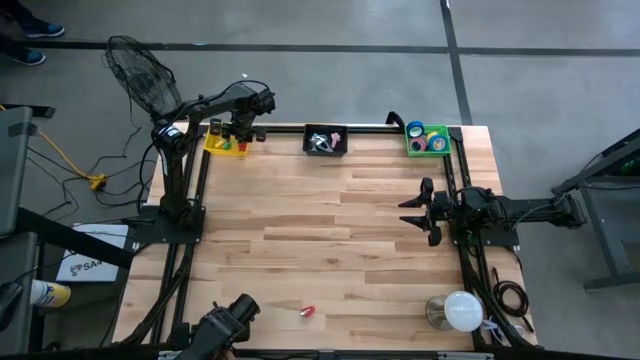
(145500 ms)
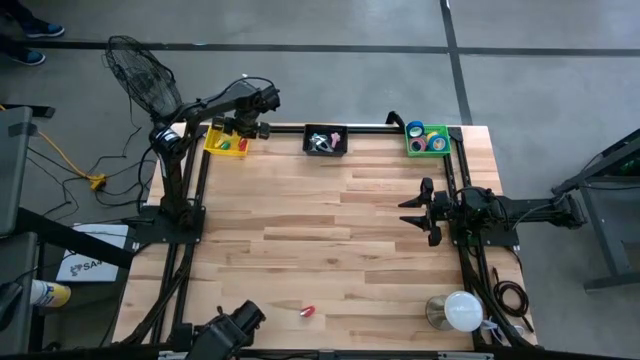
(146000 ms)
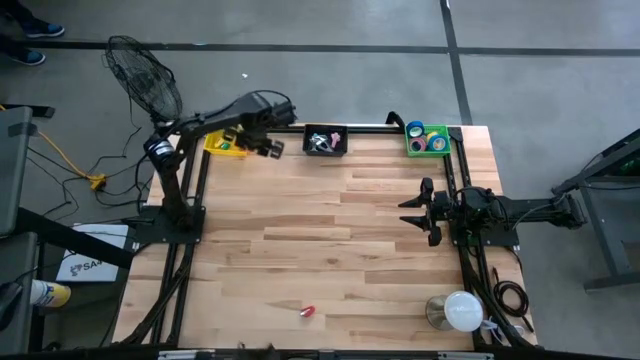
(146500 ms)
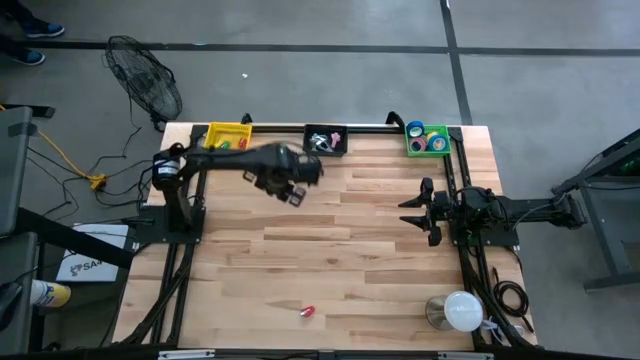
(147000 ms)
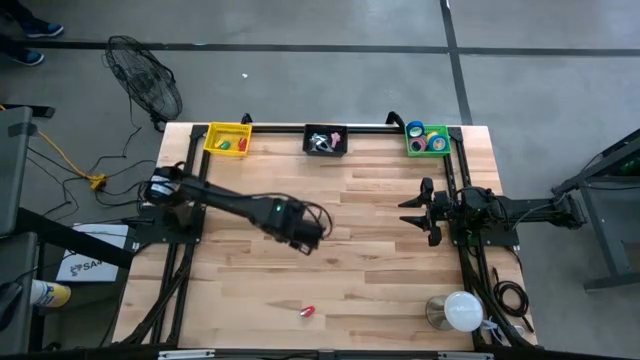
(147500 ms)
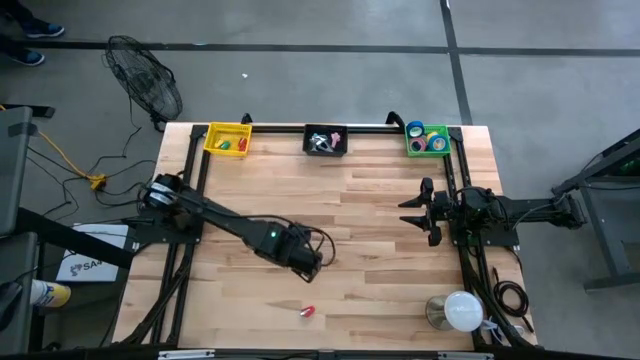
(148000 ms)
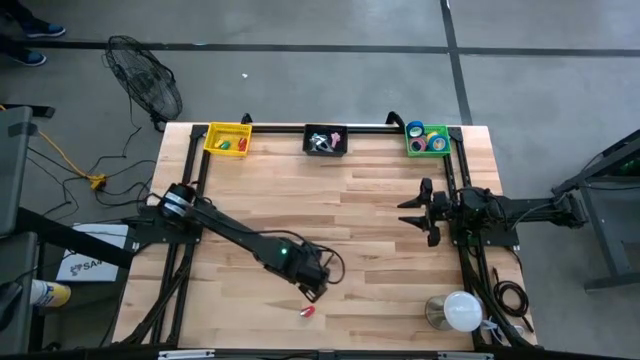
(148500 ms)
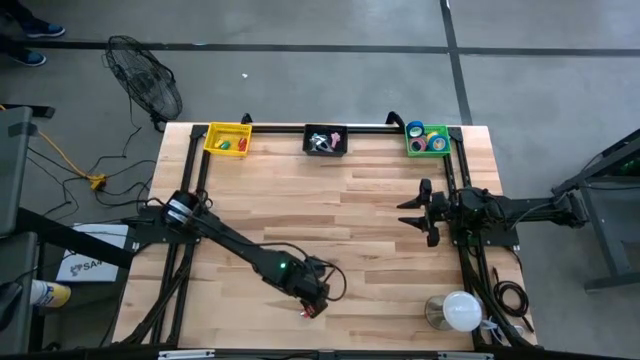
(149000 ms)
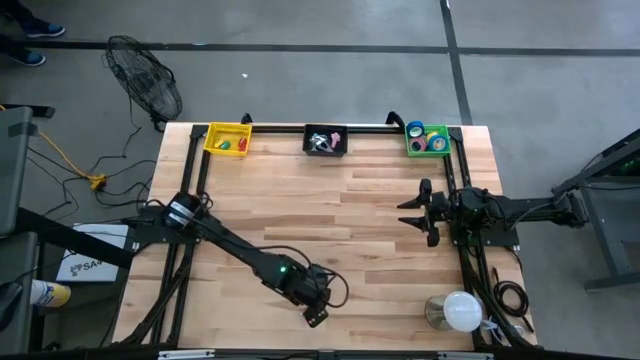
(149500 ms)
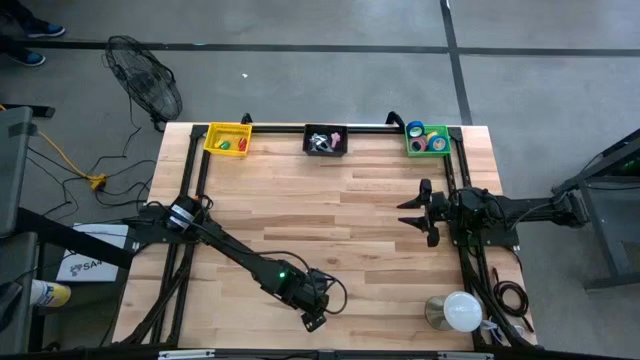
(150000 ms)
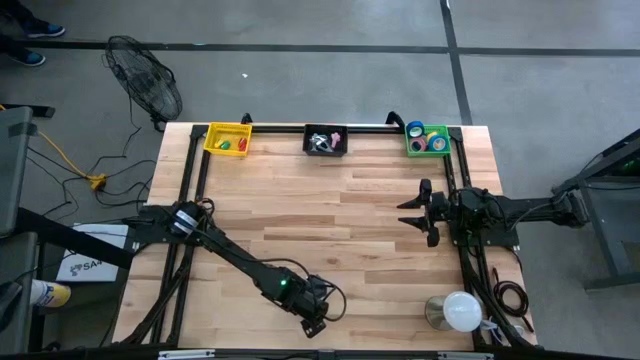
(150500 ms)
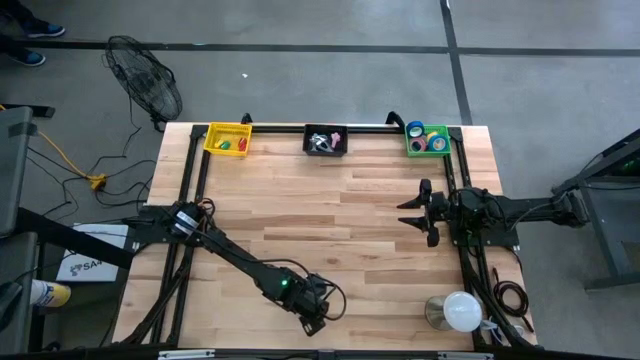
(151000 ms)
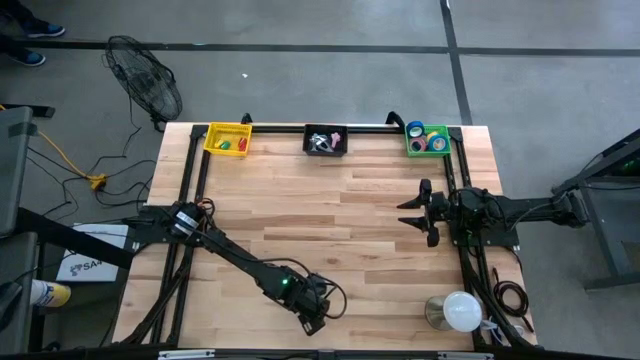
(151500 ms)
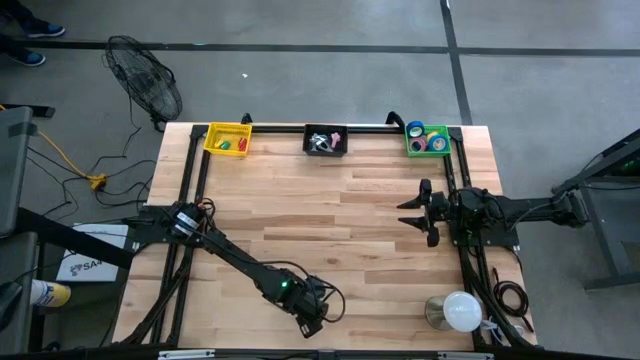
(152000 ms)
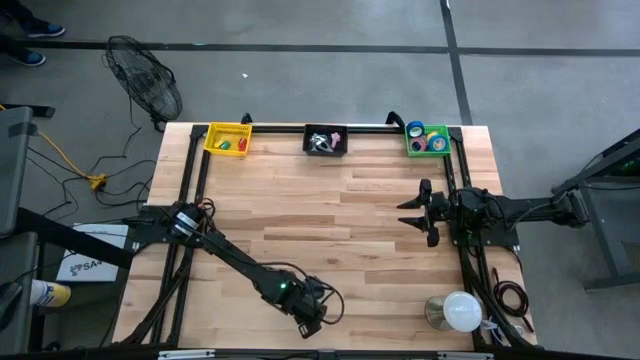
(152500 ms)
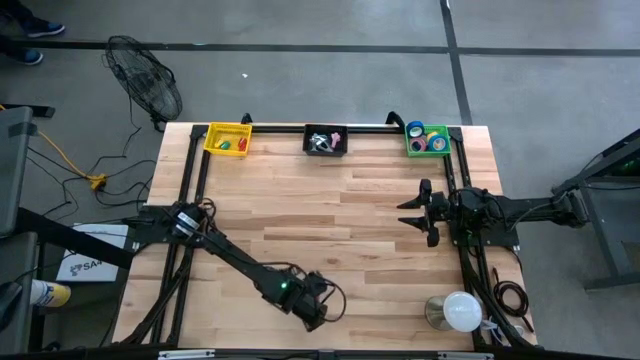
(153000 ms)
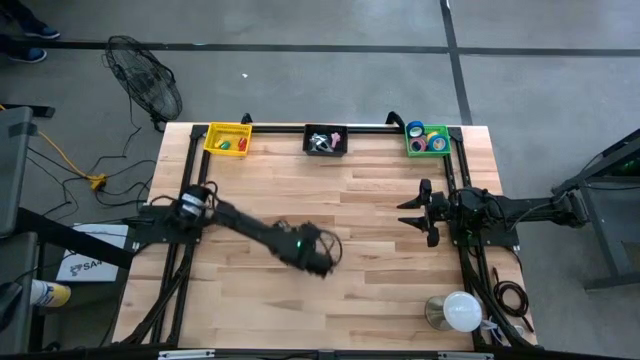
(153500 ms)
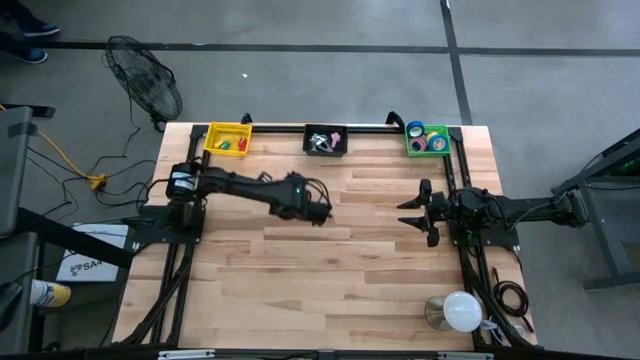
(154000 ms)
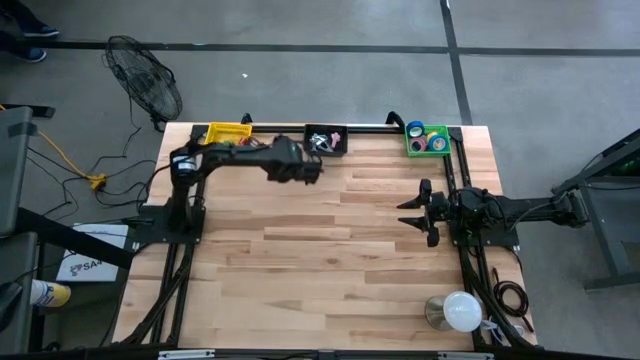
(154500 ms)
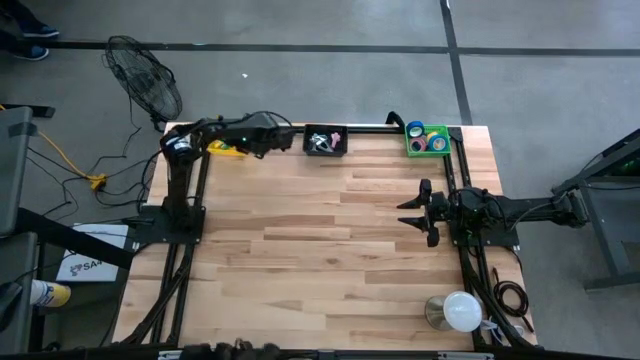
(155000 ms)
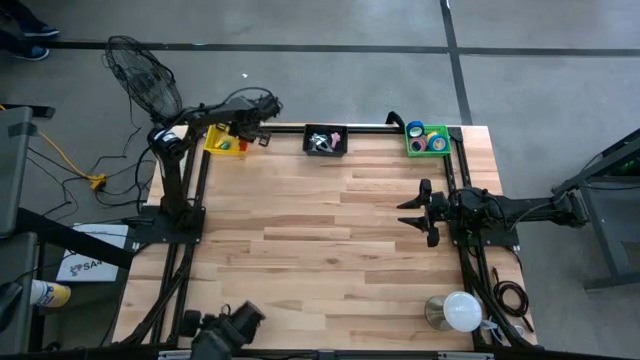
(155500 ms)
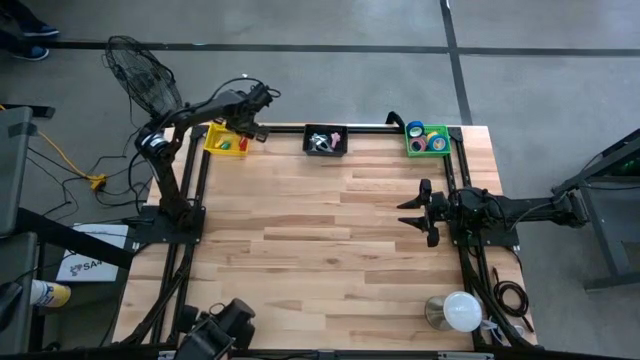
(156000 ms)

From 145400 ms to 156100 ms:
Task: Pick and place Stapler, Stapler remover, tape
Put the red stapler into the yellow bin

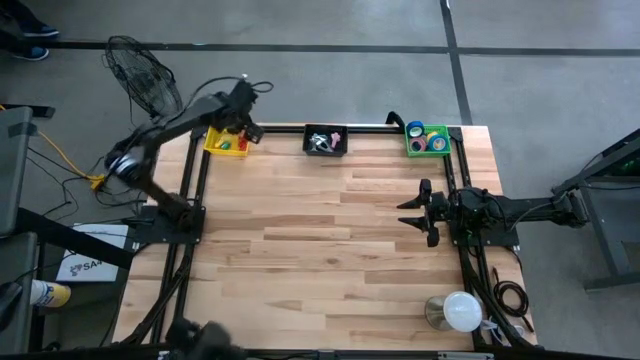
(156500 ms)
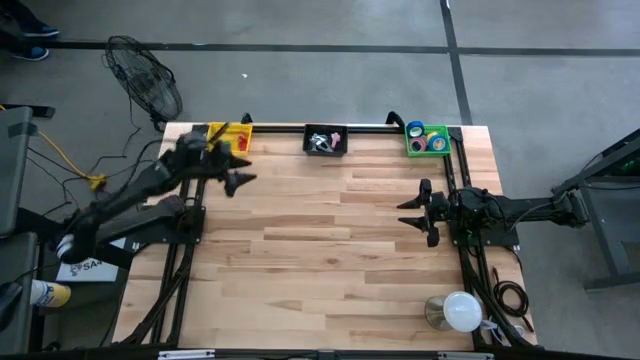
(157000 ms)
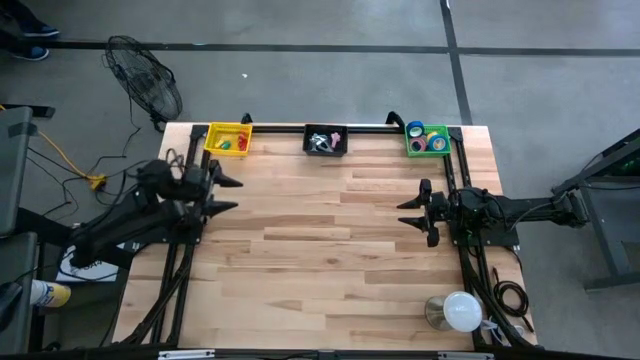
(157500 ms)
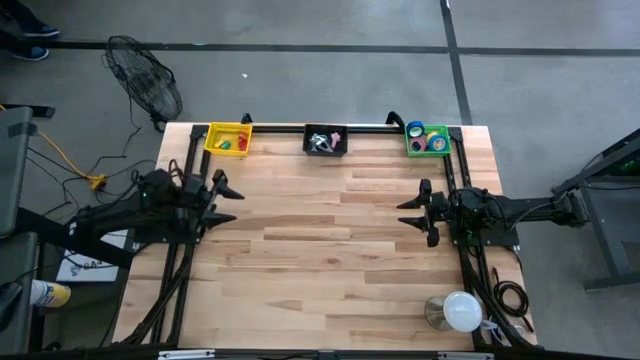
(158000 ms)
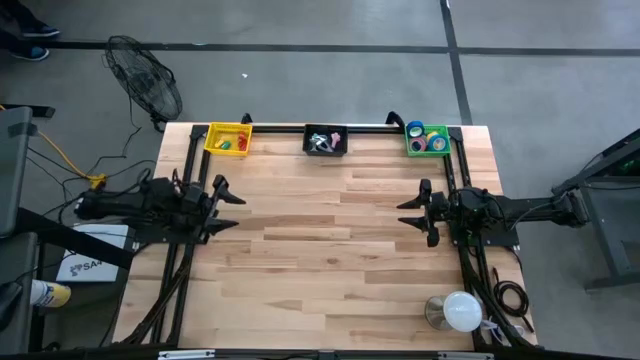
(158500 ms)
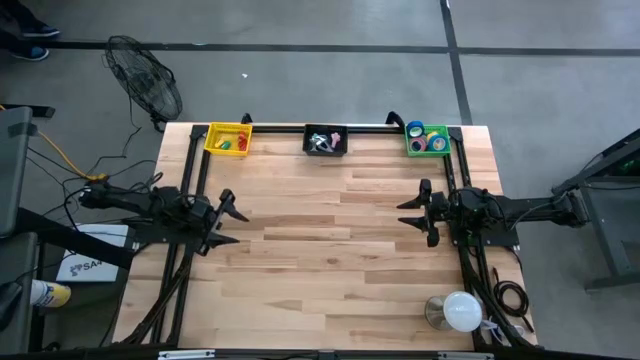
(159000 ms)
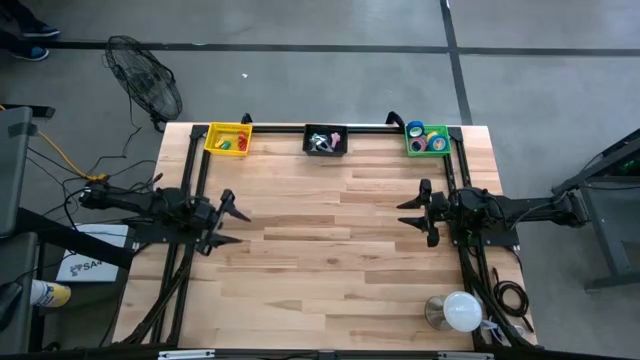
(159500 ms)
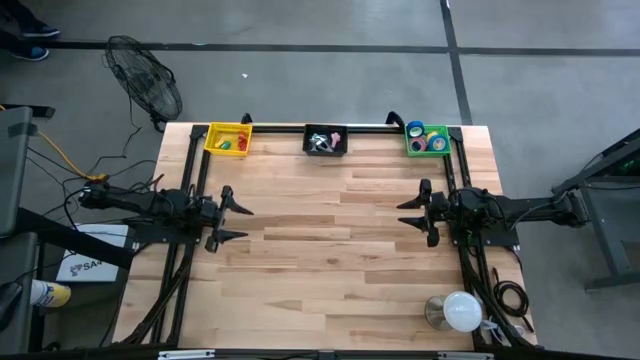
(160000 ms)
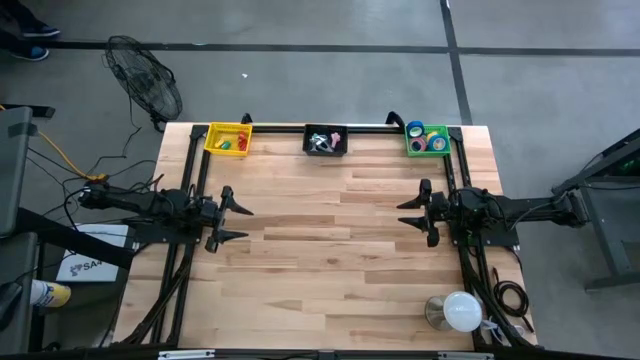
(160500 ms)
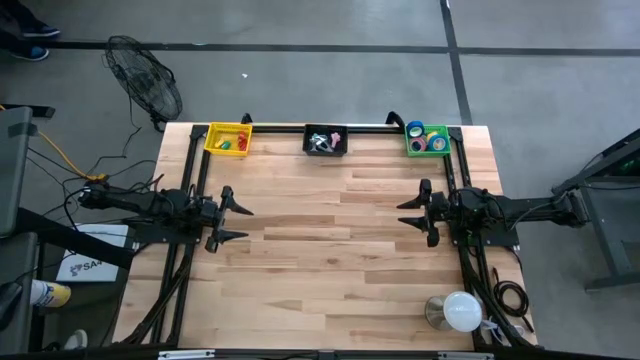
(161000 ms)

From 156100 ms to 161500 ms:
Return to Home Position

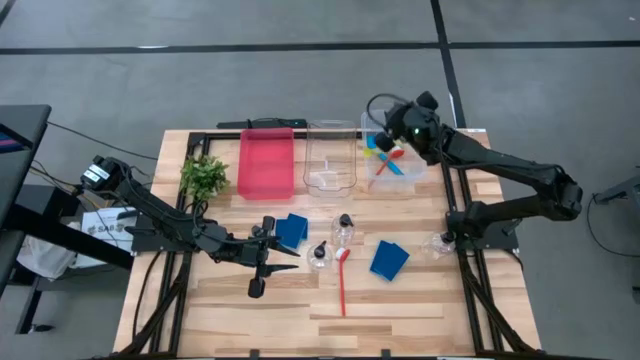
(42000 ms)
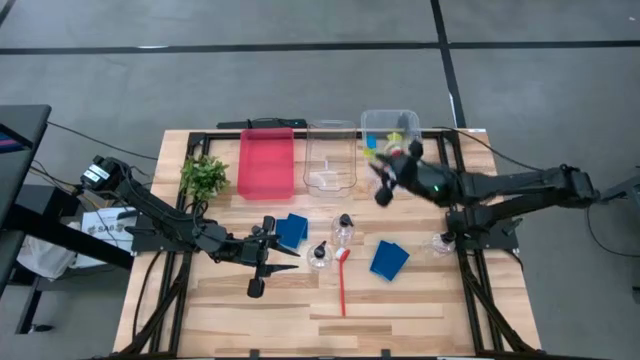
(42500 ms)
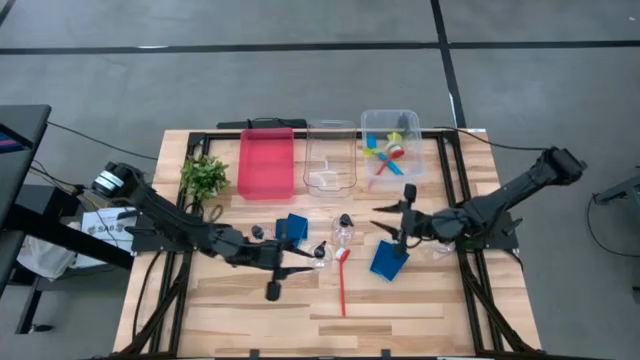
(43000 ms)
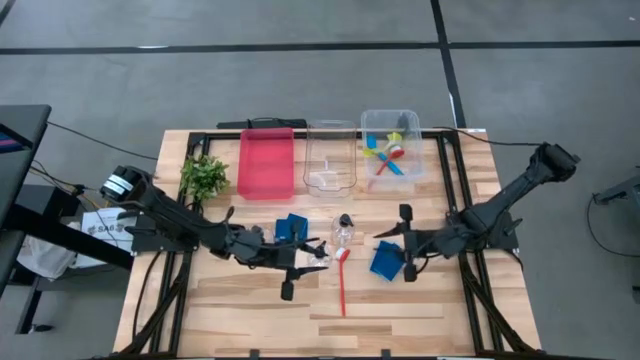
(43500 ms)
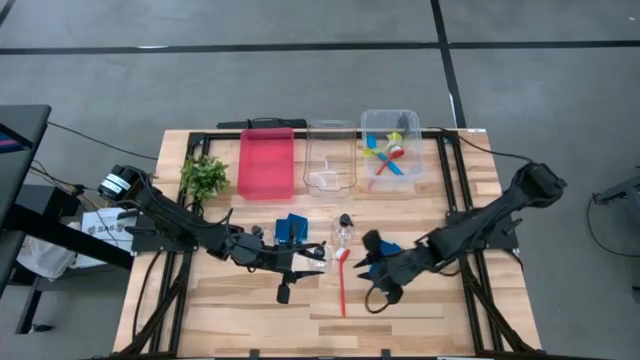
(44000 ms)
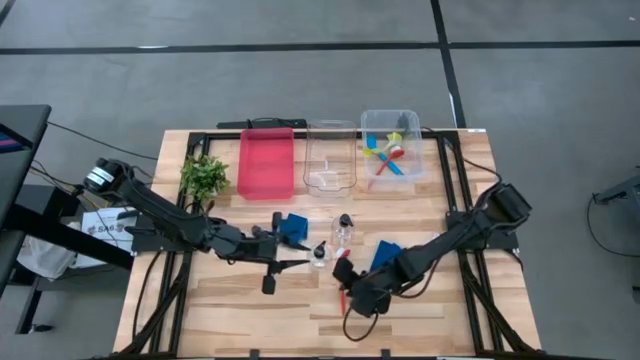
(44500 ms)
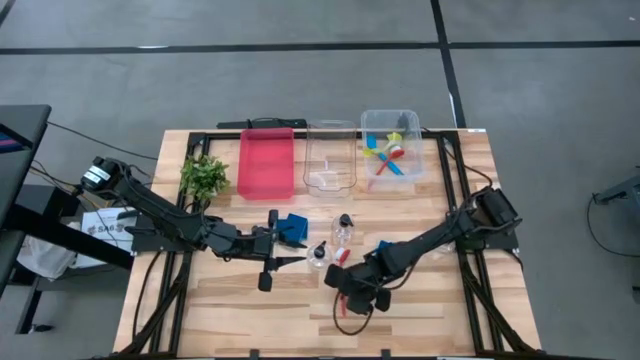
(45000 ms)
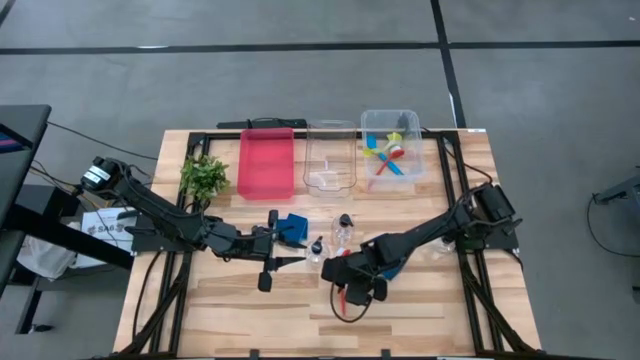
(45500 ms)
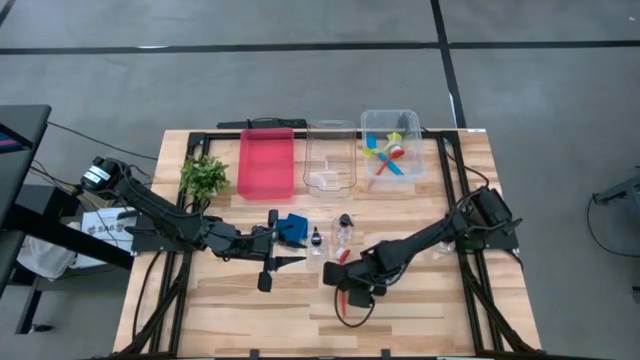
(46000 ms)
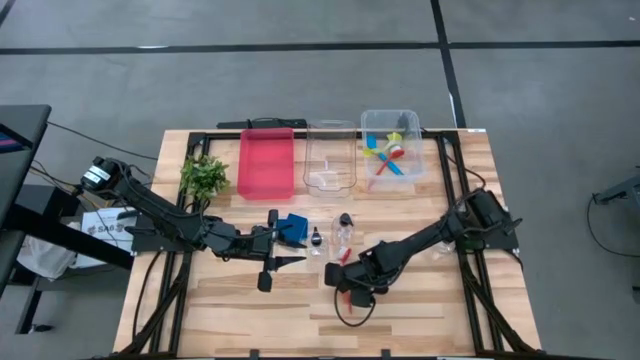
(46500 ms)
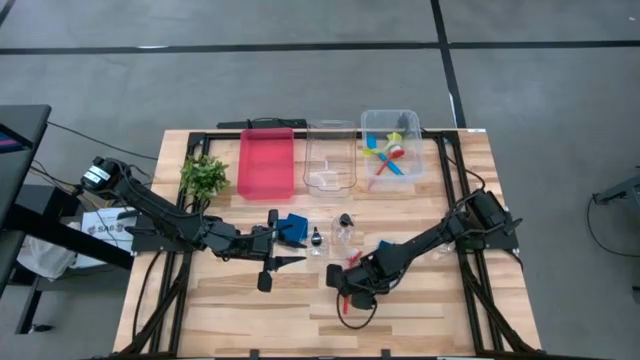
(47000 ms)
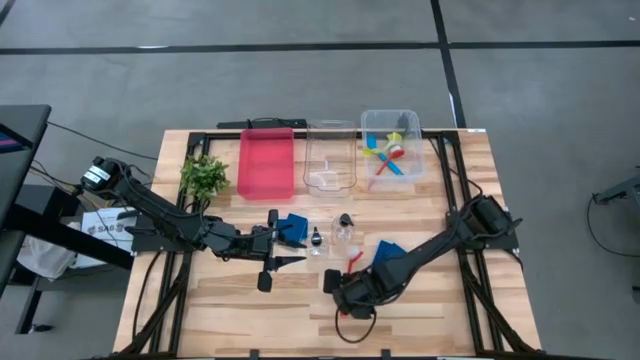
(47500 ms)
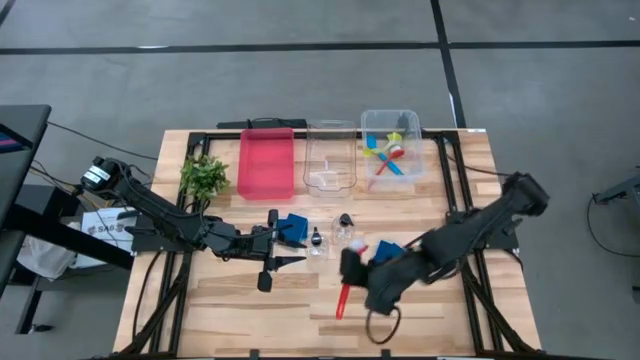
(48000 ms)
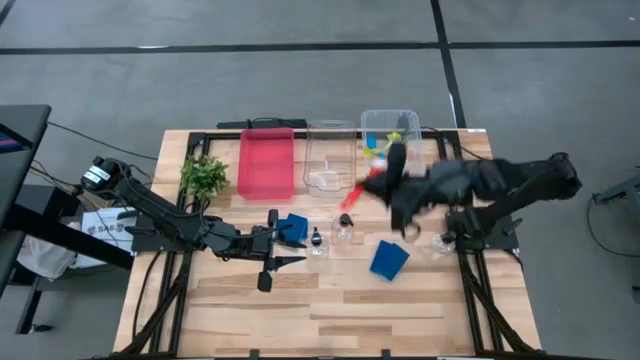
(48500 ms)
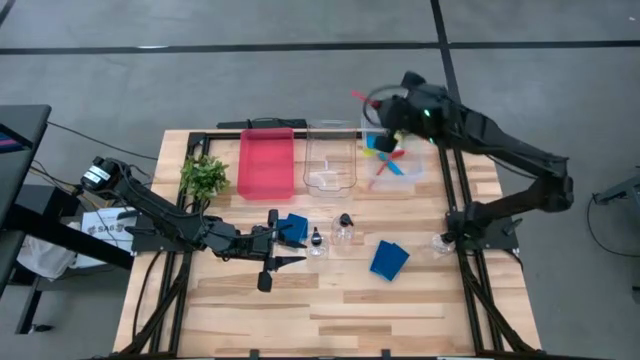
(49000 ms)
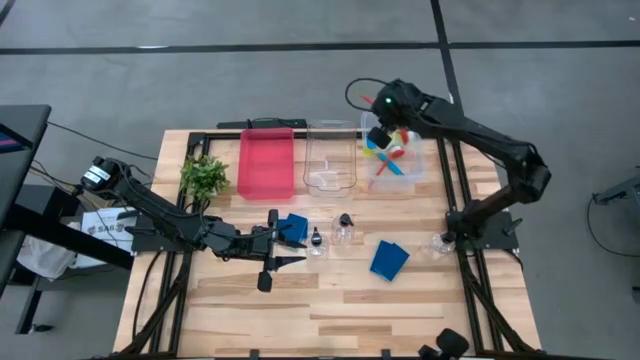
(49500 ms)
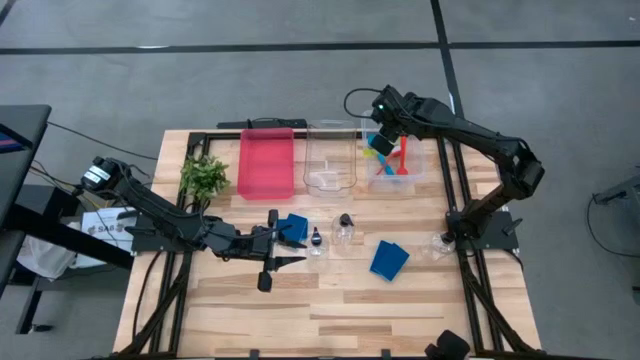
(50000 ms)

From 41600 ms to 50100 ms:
Task: Pick & Place Kitchen Sink Supplies
Put the red dishwashing brush into the white transparent bin
